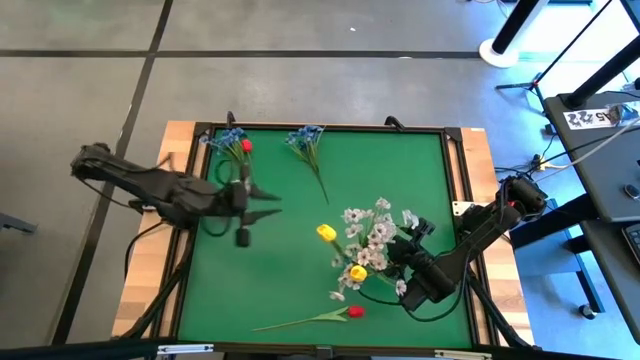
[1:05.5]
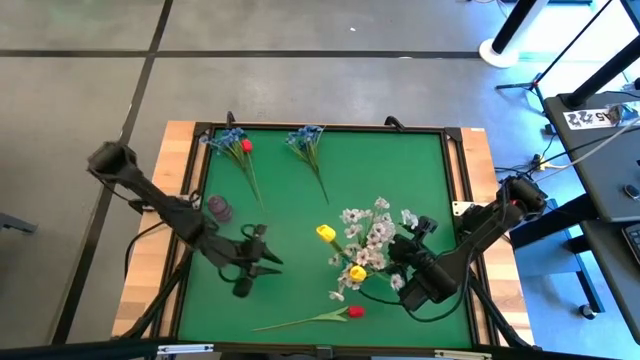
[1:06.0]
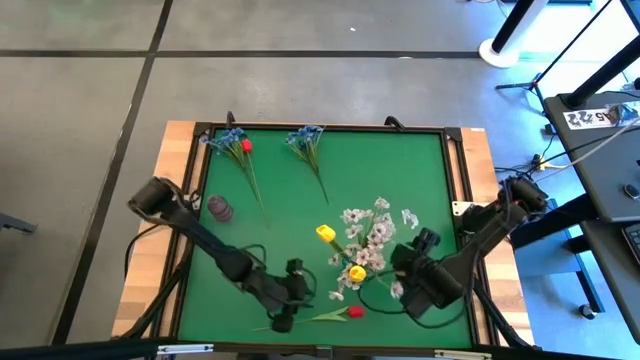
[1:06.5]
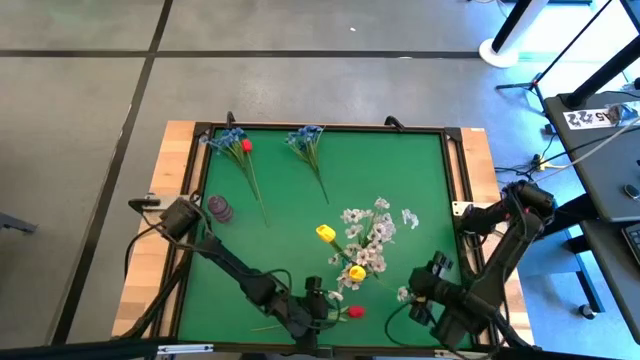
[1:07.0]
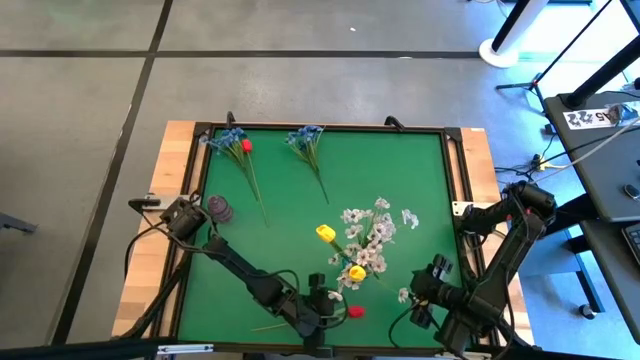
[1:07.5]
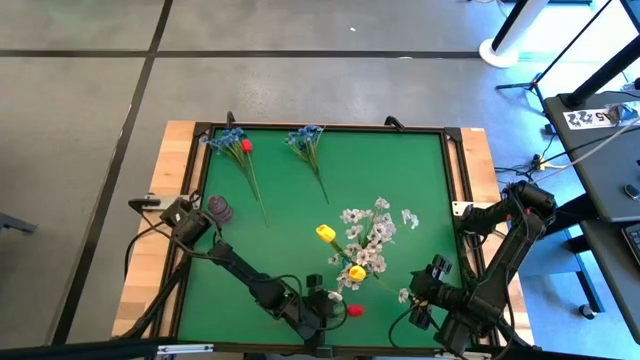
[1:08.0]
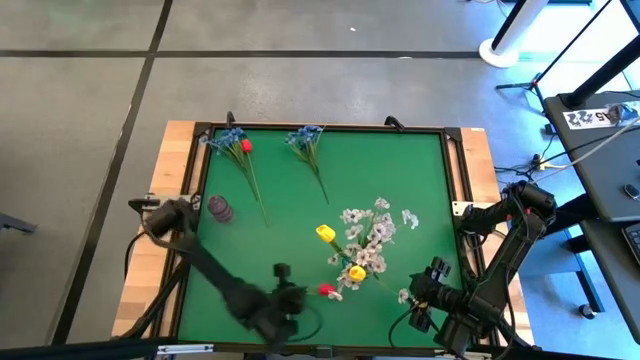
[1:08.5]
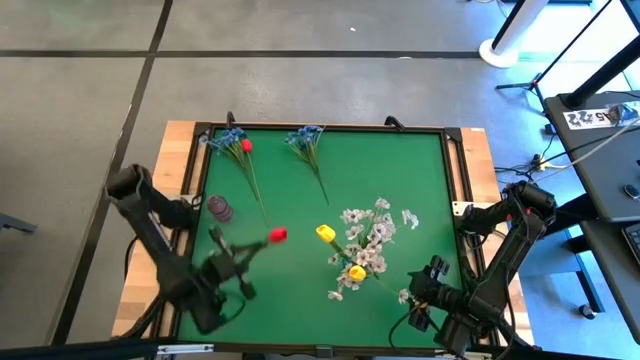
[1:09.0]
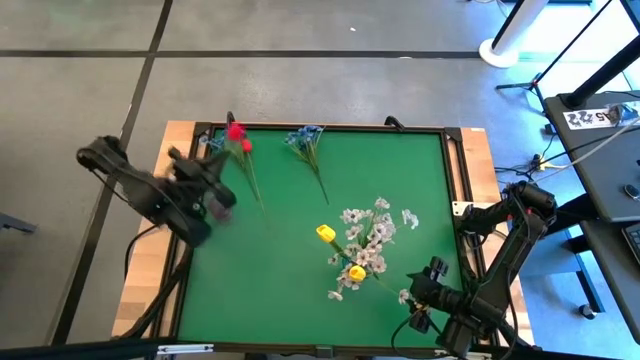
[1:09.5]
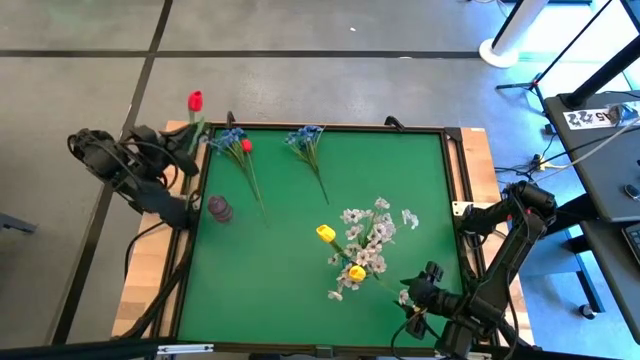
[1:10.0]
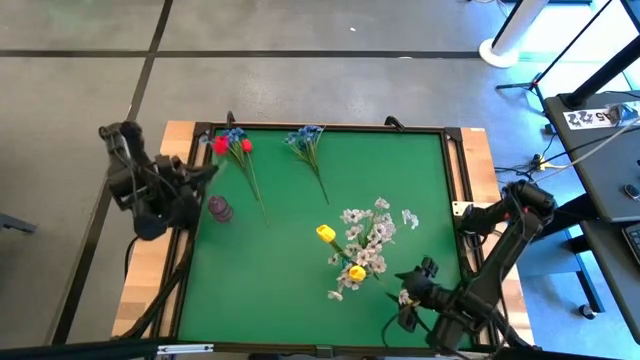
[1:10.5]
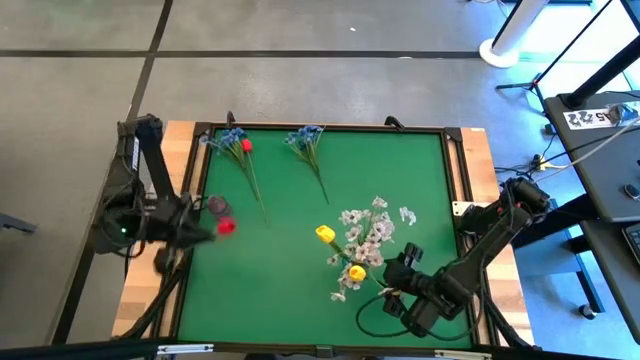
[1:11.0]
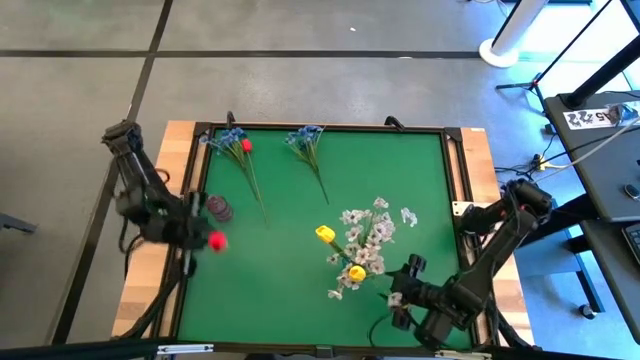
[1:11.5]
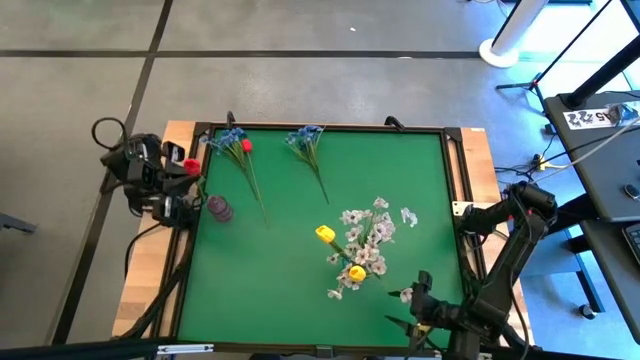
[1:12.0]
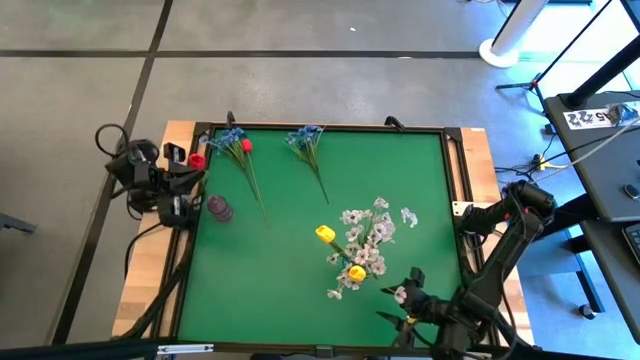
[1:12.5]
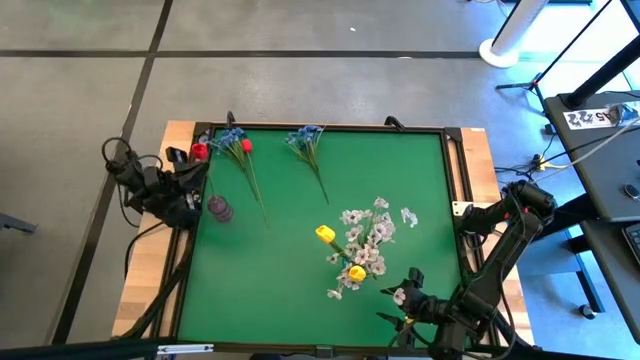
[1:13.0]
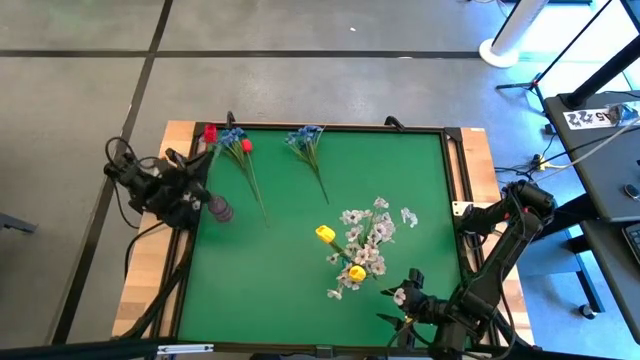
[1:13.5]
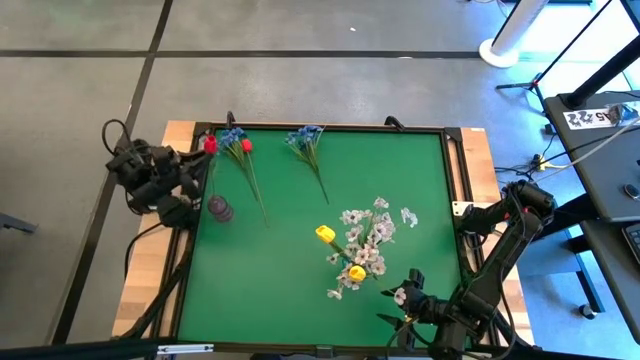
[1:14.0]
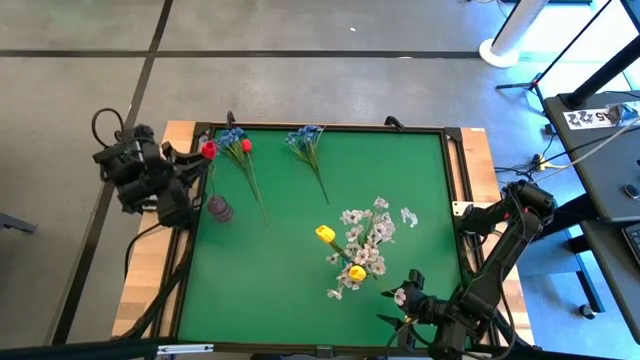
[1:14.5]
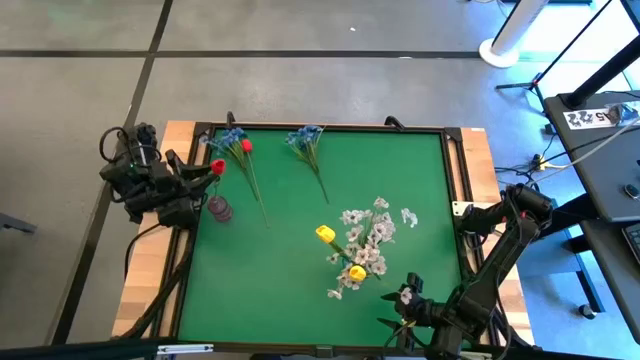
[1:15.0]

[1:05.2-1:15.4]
Task: Sort flowers into vase by color
Put the bottom red flower into the purple vase

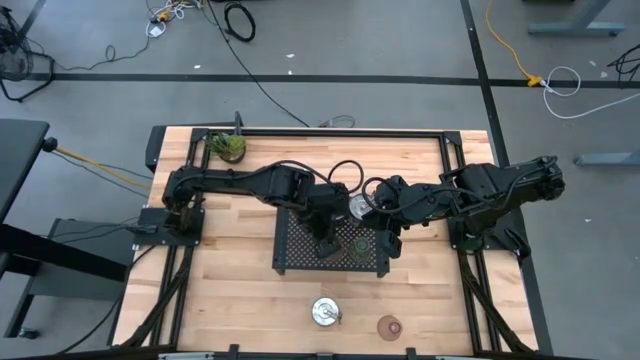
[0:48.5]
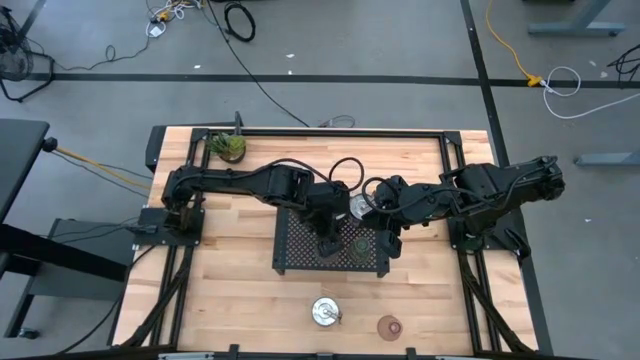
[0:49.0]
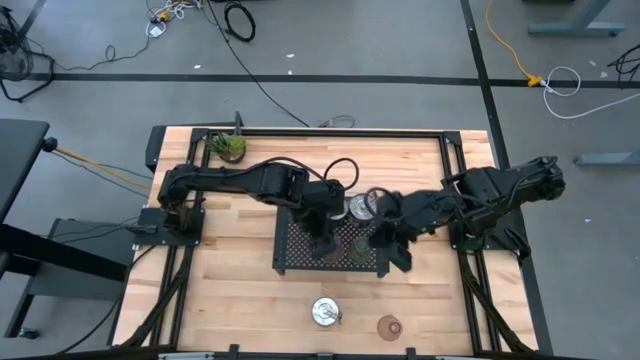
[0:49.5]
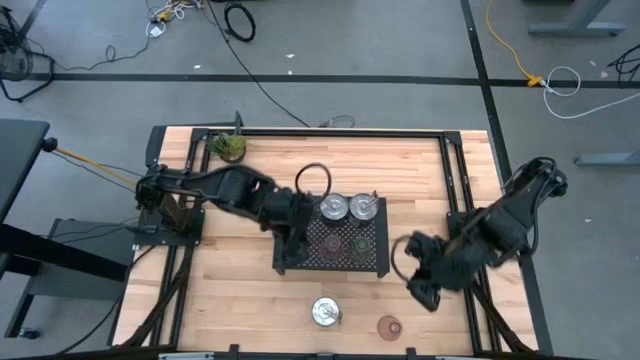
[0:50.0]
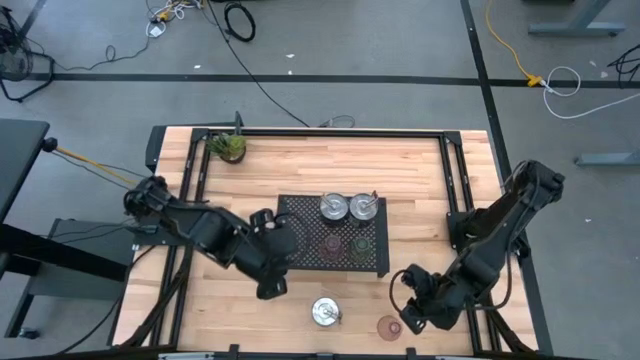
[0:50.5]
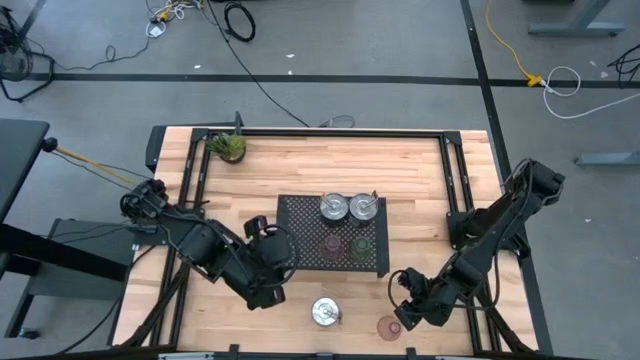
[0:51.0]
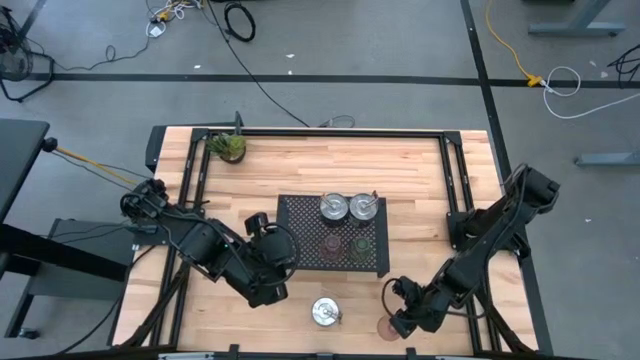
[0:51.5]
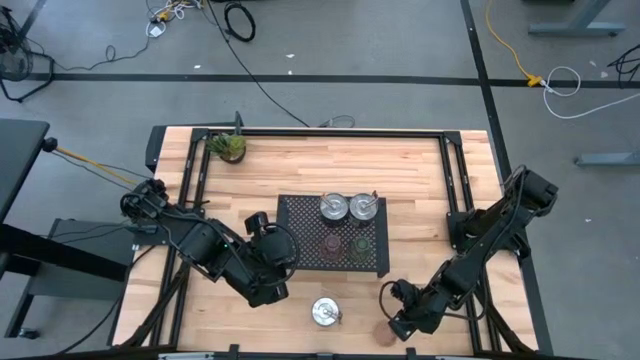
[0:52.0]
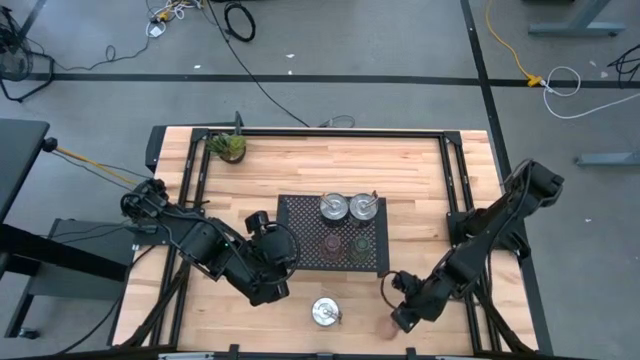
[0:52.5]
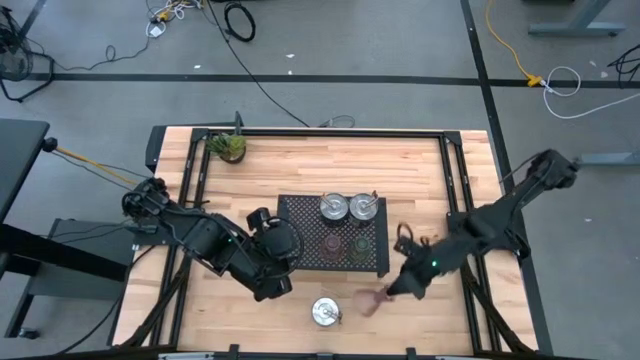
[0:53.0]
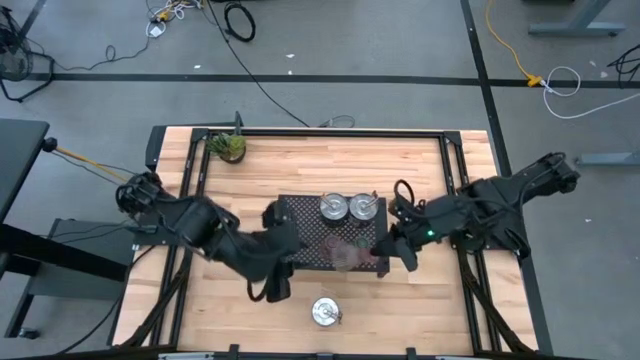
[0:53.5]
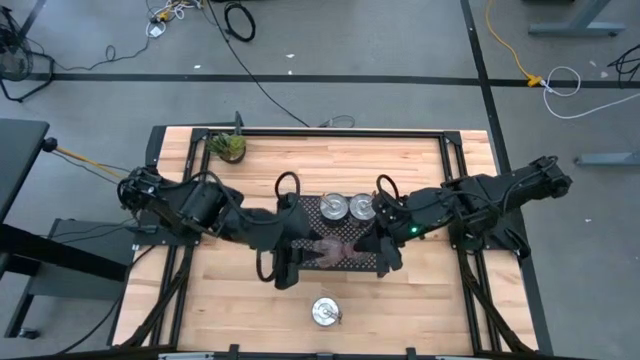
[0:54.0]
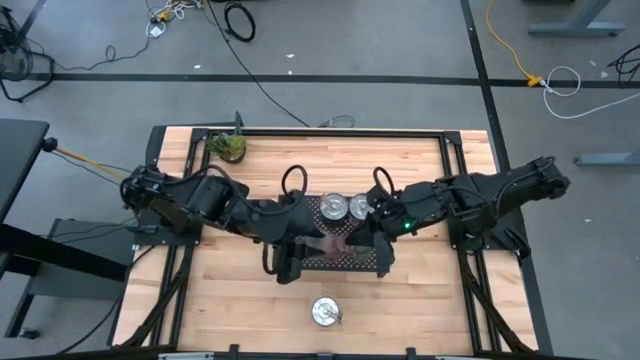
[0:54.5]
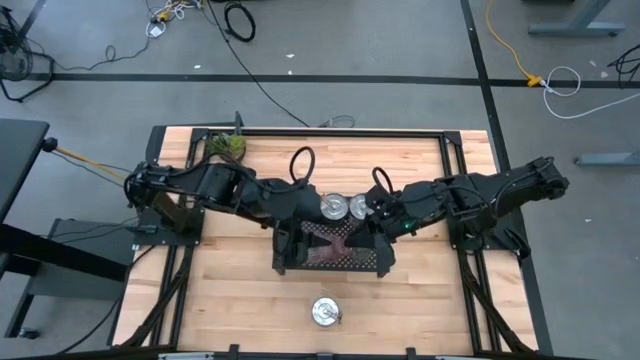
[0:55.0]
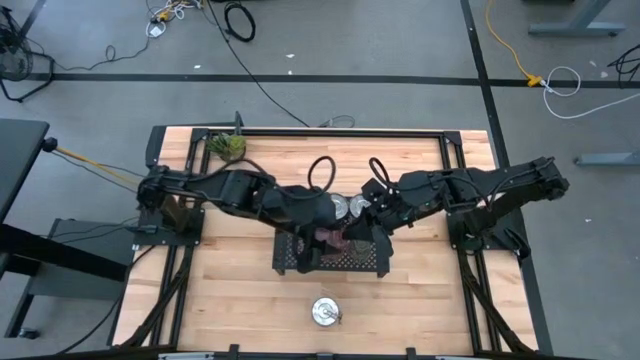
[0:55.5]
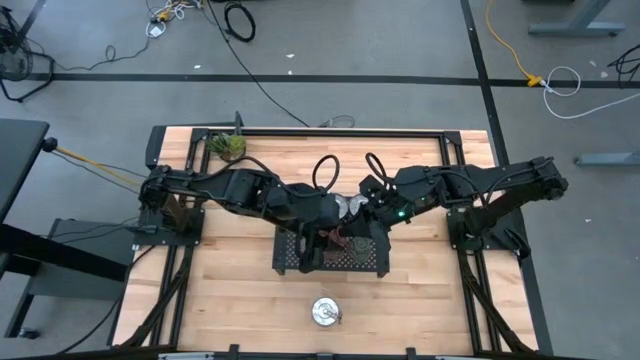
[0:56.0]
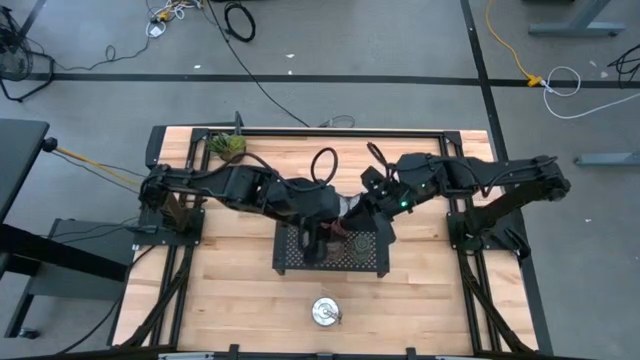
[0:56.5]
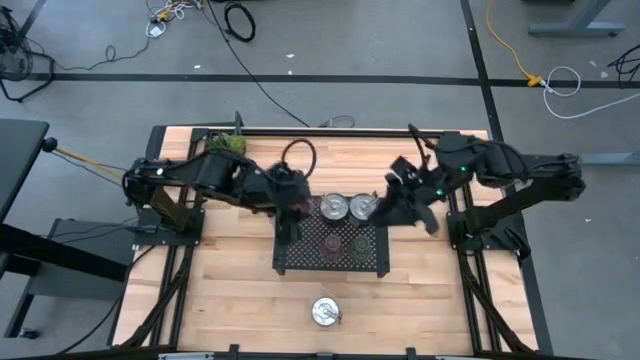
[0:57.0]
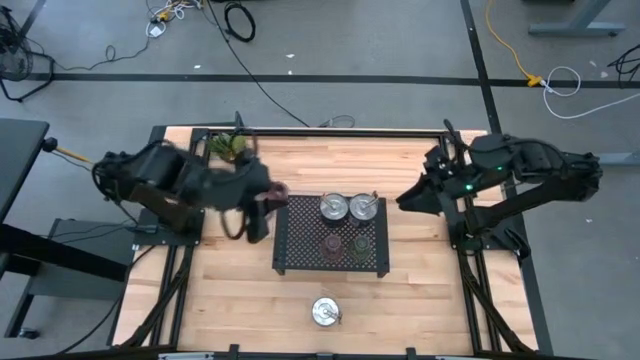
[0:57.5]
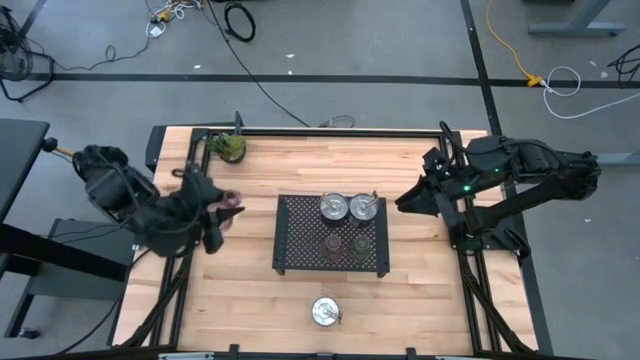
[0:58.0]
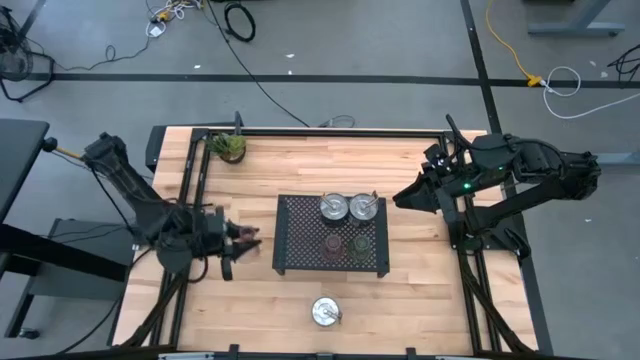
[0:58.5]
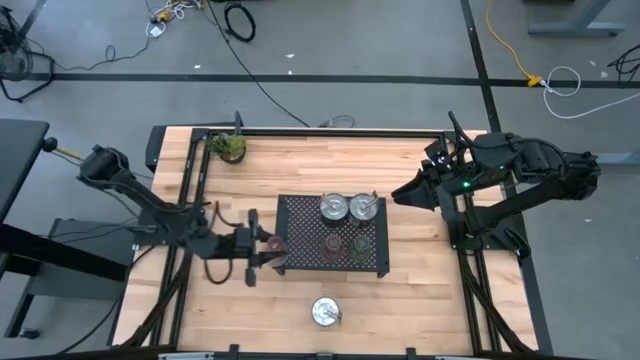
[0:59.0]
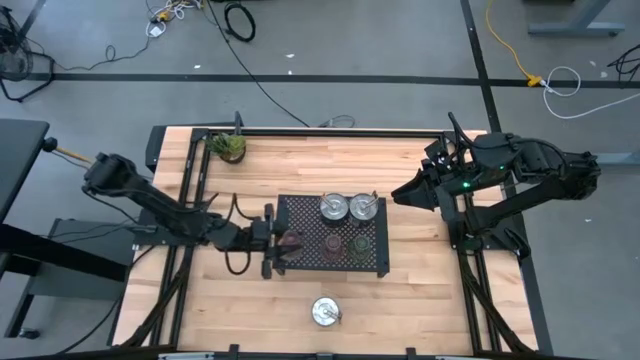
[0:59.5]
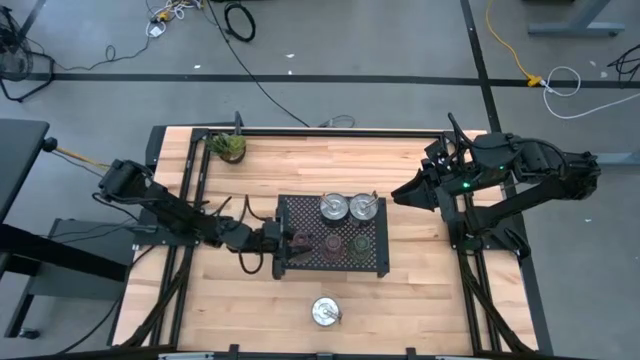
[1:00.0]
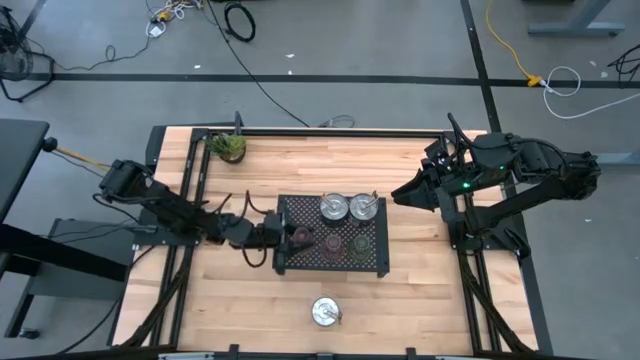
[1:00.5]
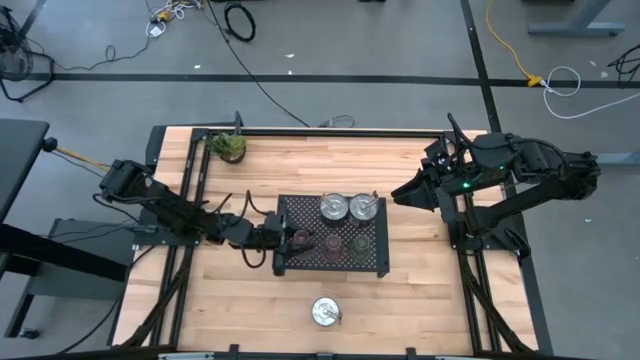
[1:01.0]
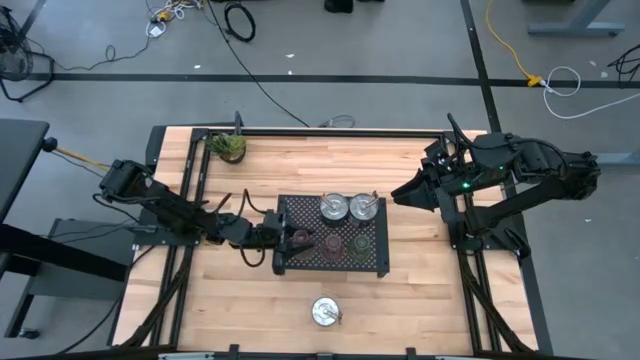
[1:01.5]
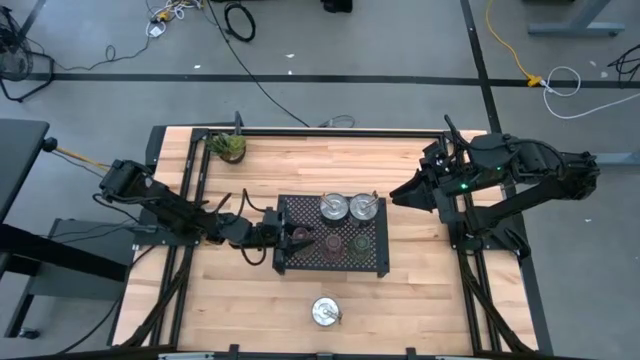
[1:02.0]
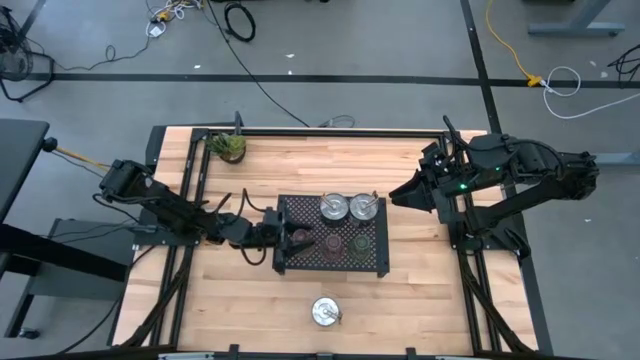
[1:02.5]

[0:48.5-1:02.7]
Task: Pick & Place candle stick holders
Put the pink candle holder on the shelf aligned with the pink candle holder
